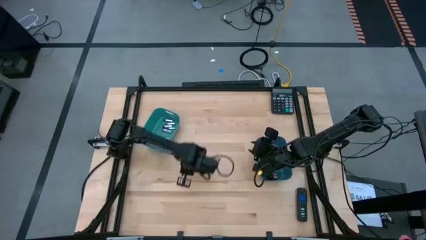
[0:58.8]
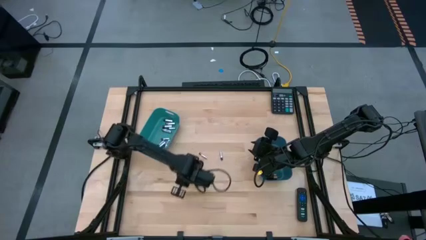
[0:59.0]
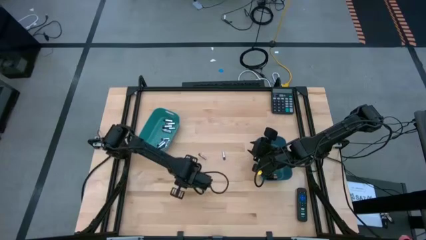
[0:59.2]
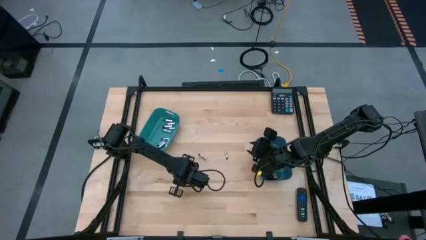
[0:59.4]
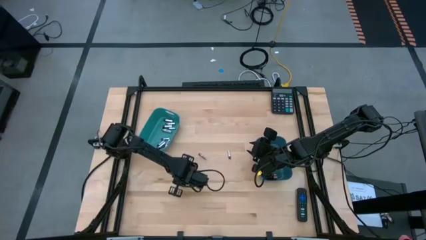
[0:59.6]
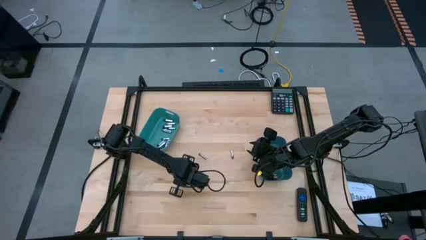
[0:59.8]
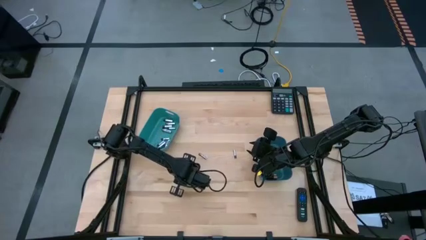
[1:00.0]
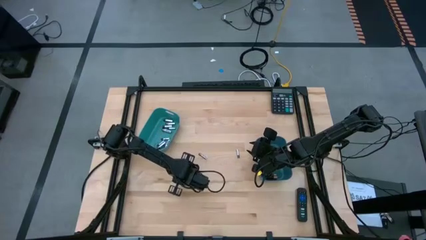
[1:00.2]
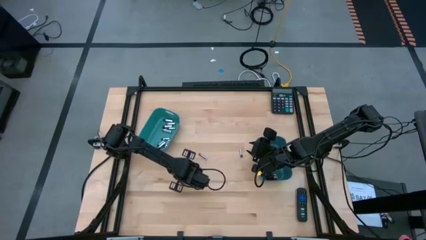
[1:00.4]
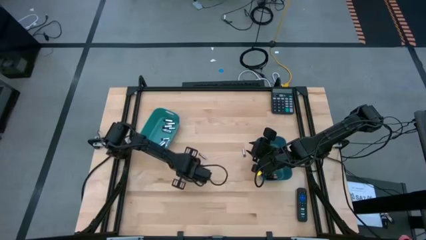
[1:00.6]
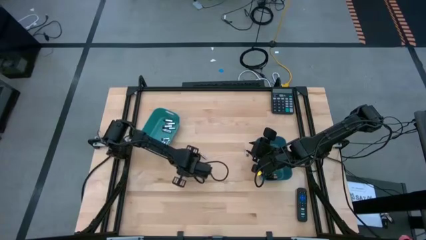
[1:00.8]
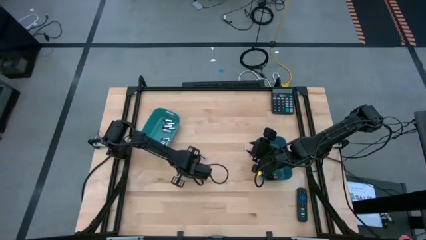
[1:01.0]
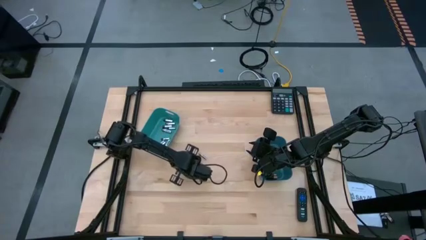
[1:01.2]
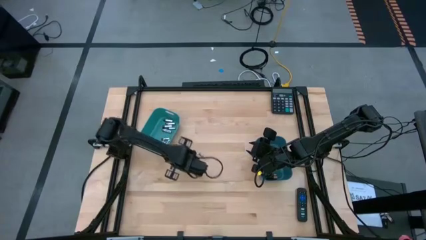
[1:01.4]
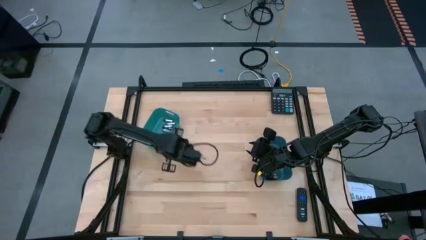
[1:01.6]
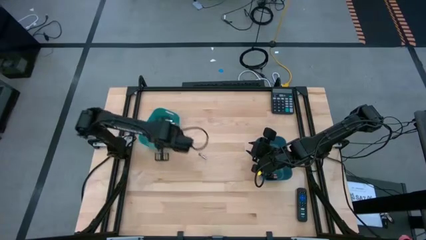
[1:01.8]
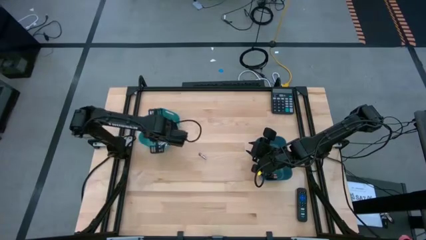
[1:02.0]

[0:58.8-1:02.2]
Task: Sort batteries
Put the silver battery into the green bin

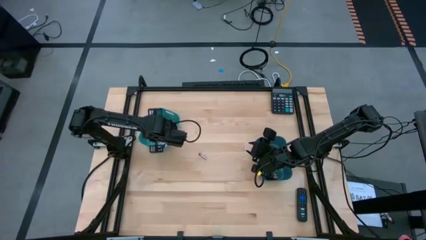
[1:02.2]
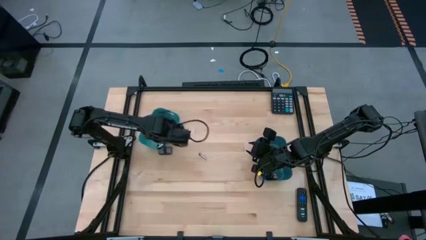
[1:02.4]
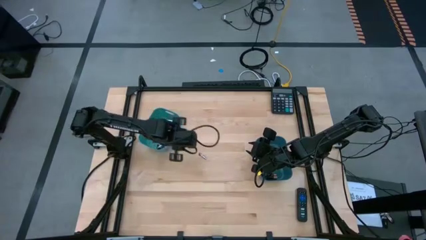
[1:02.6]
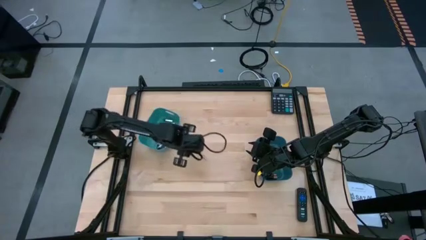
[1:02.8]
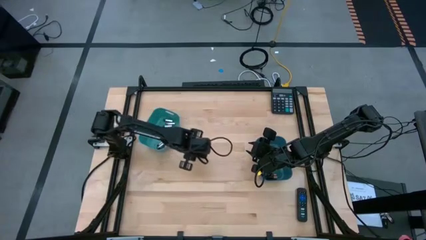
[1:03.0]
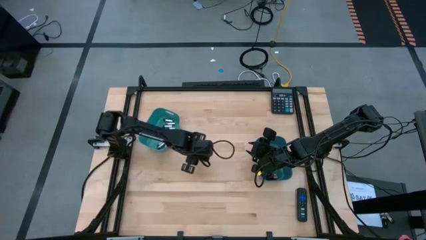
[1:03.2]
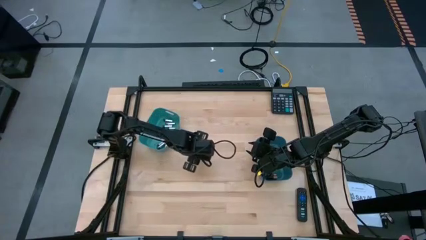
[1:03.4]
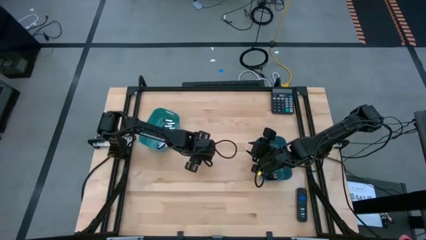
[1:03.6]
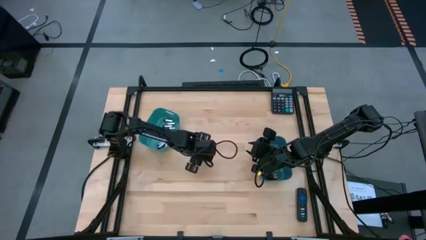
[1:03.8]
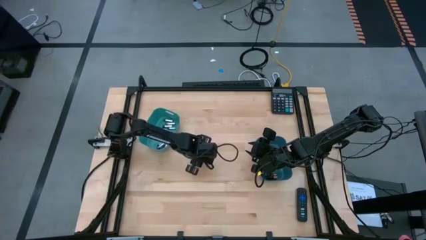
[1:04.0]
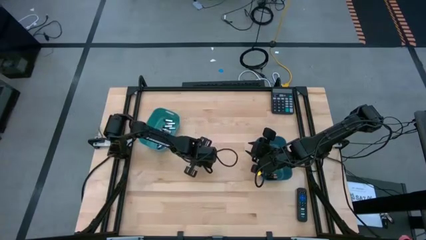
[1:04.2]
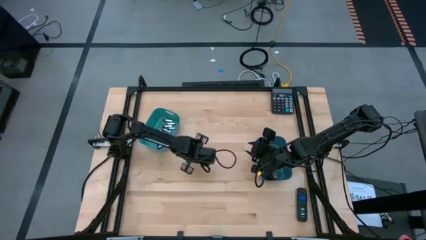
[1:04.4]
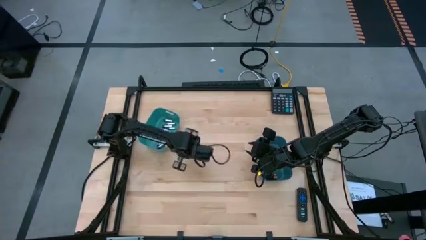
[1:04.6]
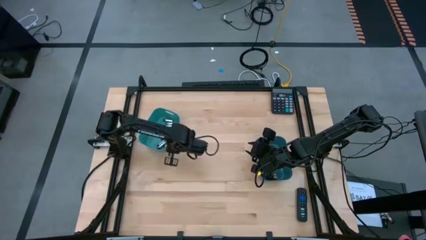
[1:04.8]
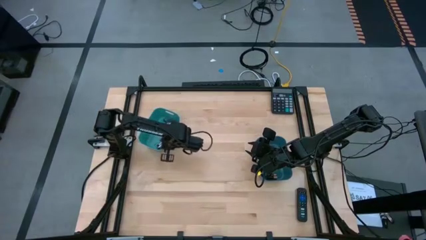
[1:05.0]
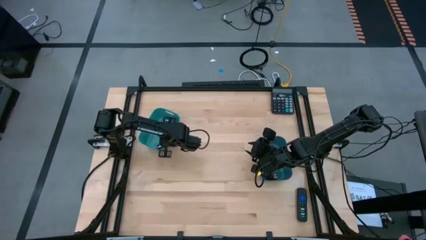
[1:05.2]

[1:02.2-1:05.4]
Put the silver battery into the green bin

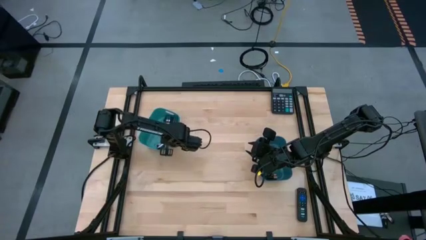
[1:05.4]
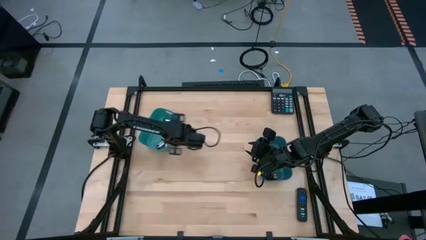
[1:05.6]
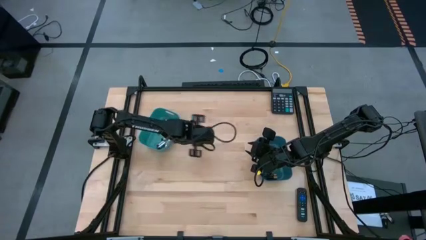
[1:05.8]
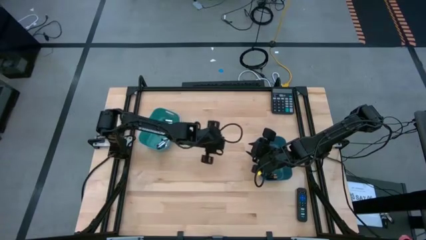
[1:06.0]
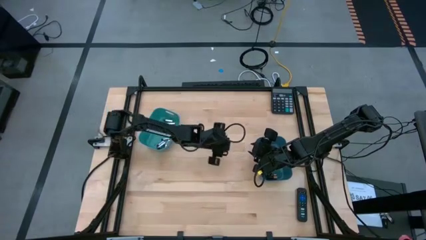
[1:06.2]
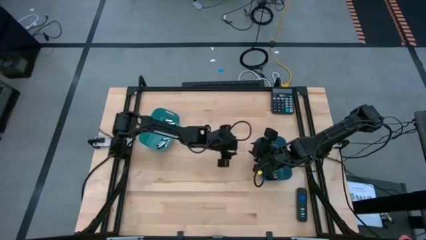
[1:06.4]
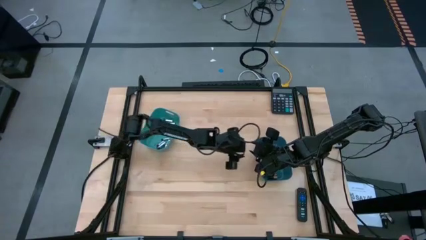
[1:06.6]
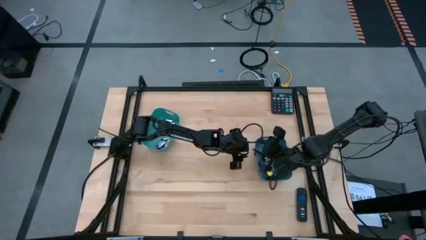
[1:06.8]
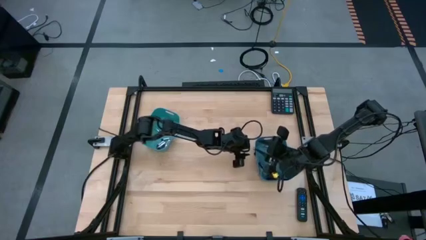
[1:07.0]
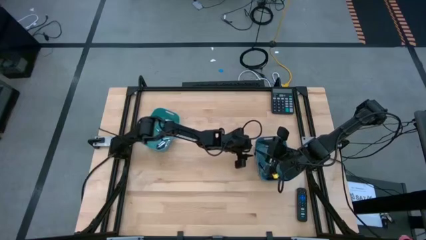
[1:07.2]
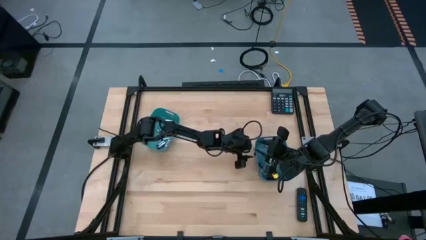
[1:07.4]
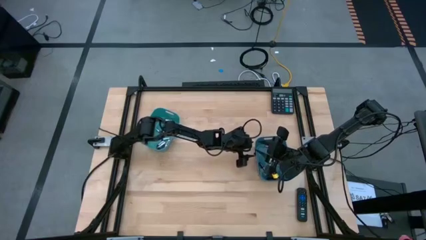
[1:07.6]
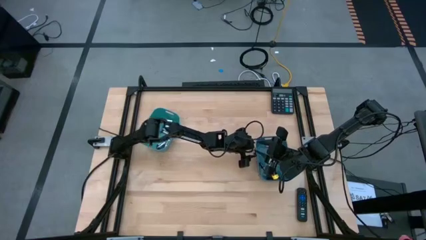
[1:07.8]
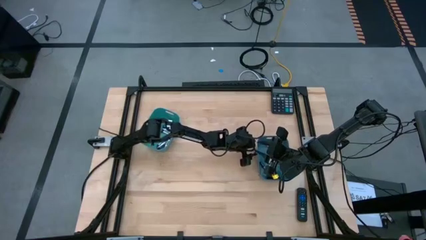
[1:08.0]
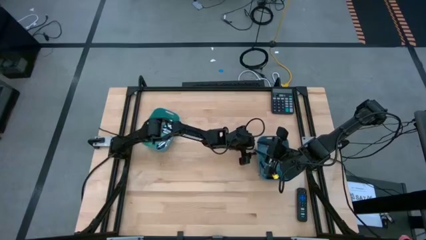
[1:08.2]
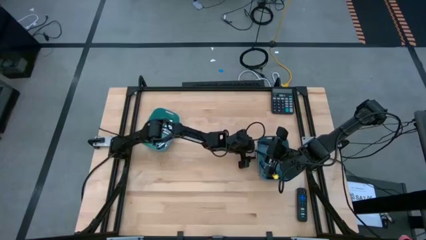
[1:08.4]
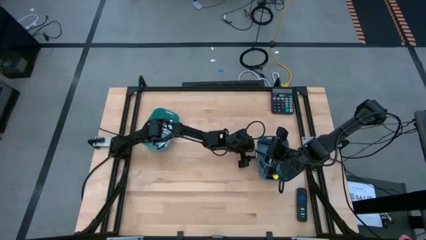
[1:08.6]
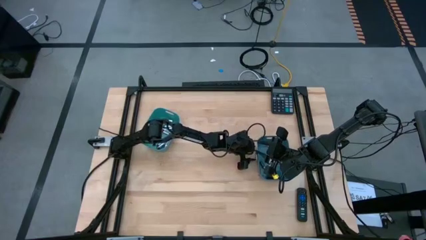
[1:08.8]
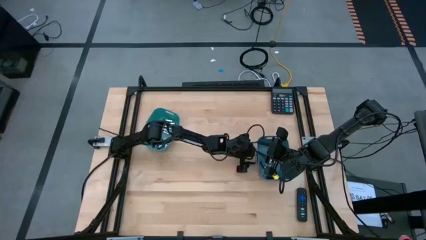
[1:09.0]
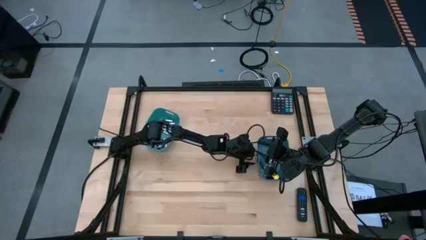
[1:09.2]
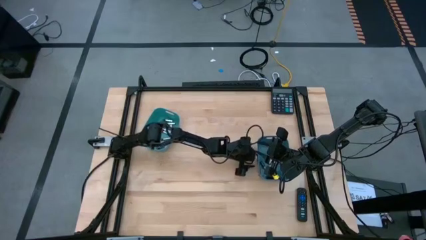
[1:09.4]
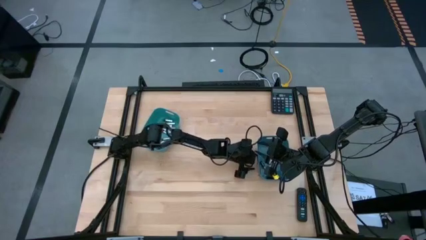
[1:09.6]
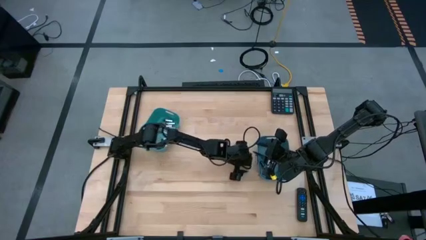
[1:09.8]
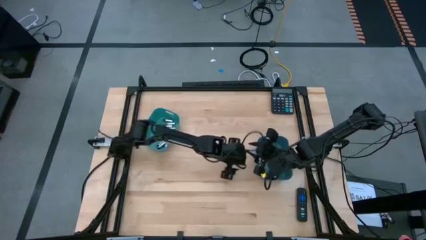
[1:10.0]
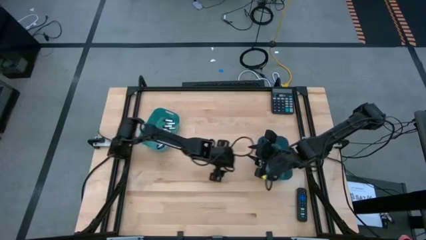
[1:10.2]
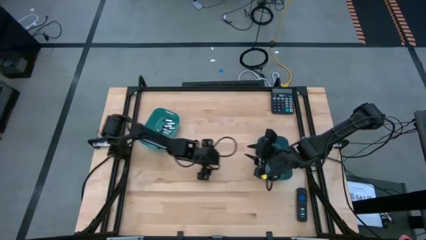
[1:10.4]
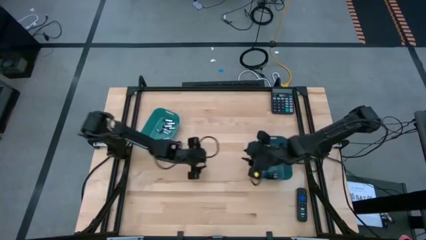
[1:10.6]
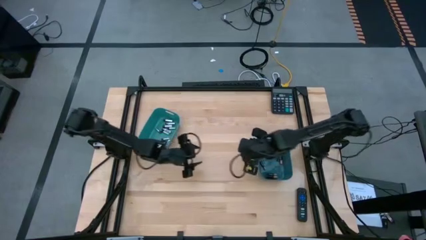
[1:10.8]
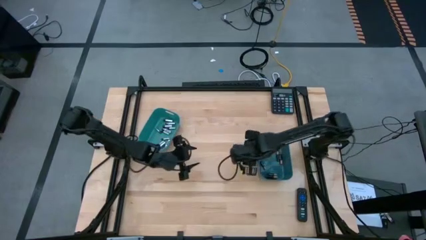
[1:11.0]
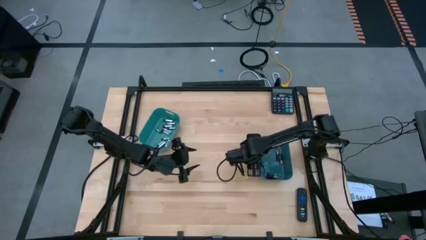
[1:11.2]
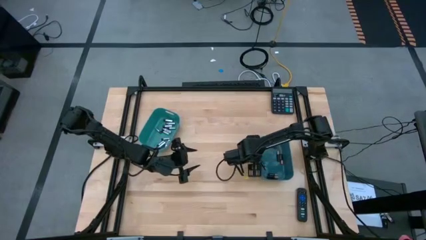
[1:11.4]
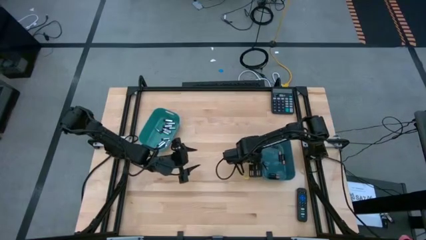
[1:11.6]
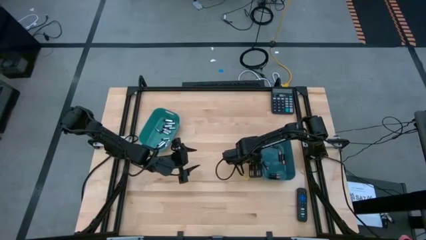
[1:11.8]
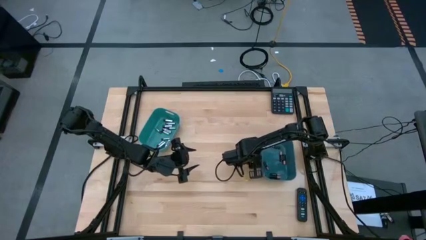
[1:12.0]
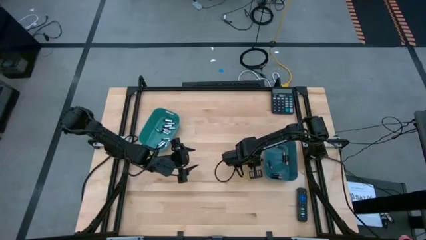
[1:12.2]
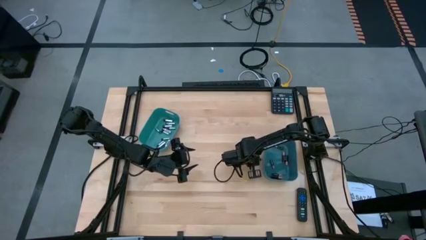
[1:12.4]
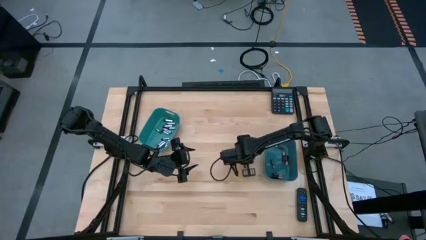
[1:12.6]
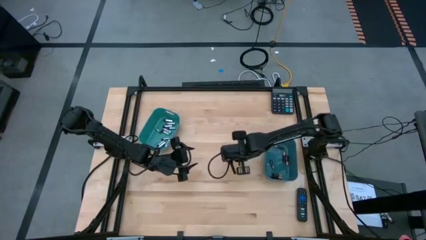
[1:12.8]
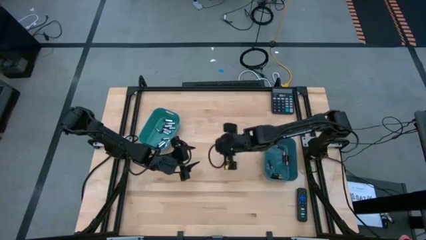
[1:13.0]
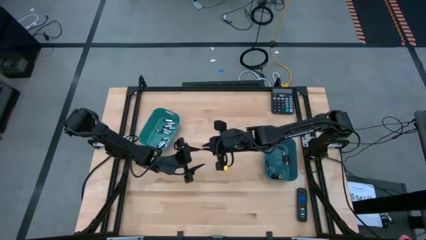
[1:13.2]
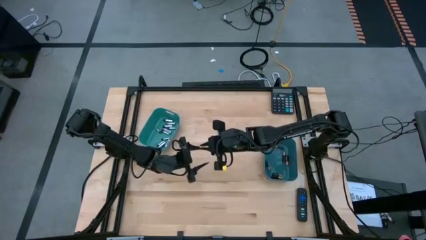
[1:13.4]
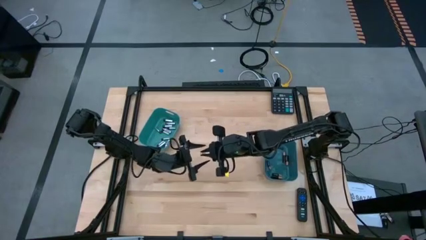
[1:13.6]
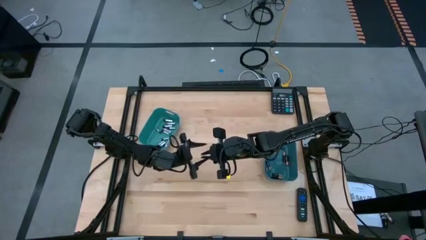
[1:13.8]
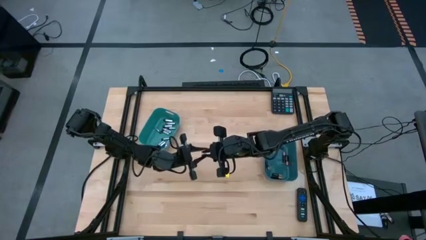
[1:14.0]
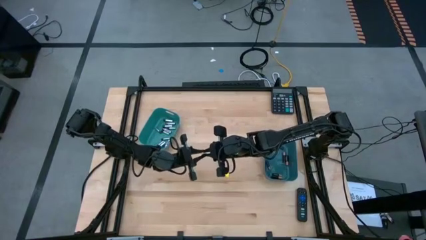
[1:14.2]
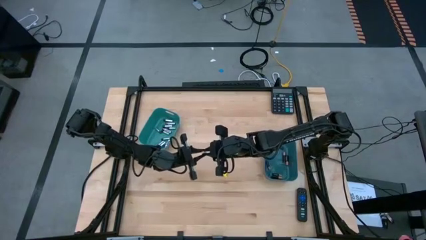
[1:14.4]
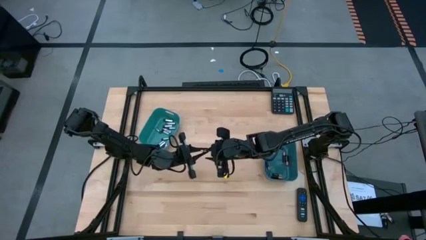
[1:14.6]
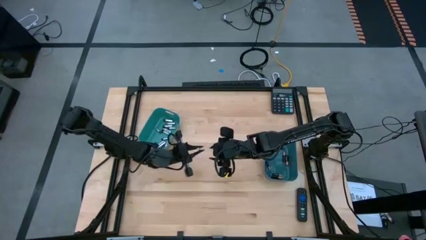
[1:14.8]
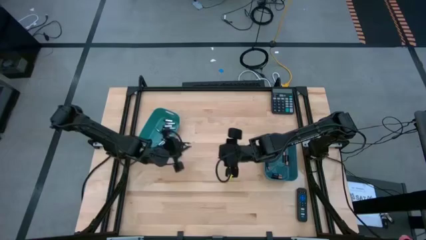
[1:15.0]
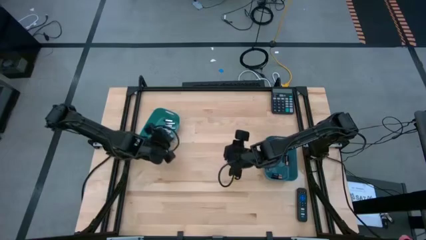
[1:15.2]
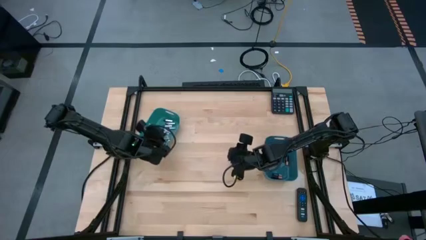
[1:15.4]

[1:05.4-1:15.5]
Put the silver battery into the green bin
